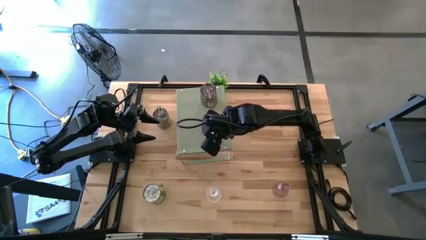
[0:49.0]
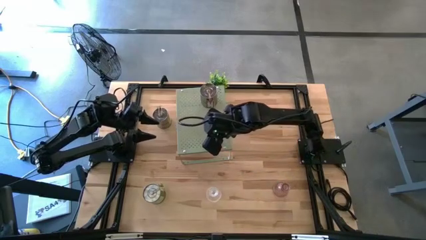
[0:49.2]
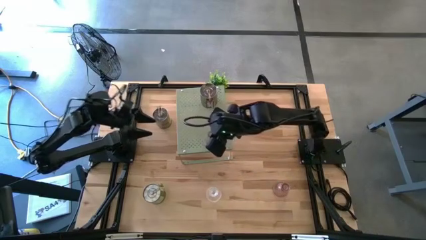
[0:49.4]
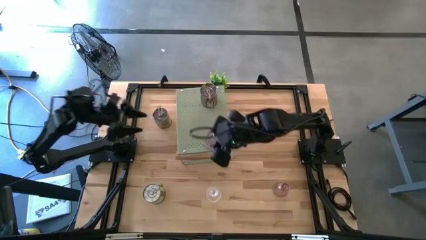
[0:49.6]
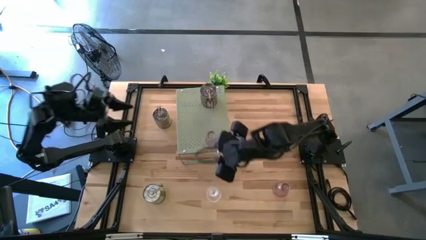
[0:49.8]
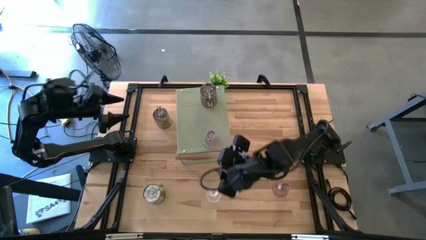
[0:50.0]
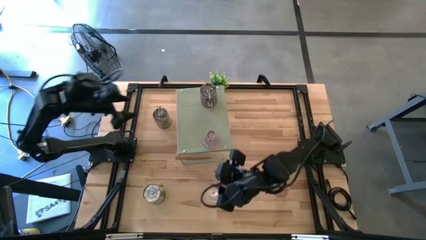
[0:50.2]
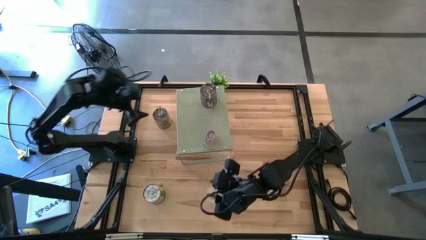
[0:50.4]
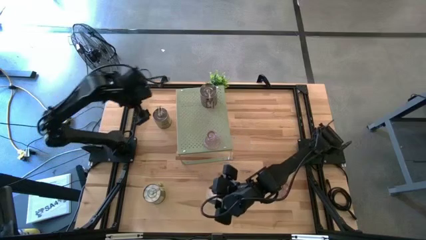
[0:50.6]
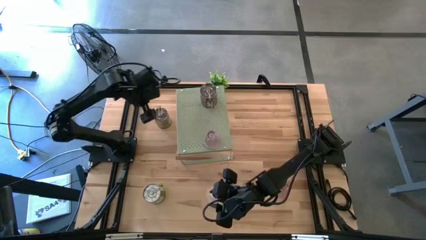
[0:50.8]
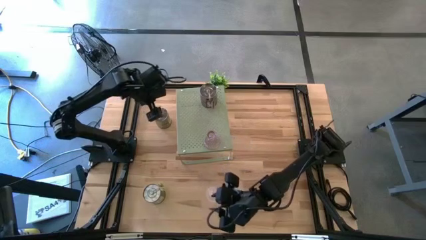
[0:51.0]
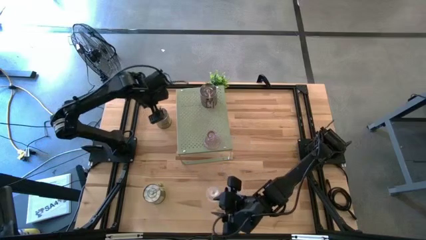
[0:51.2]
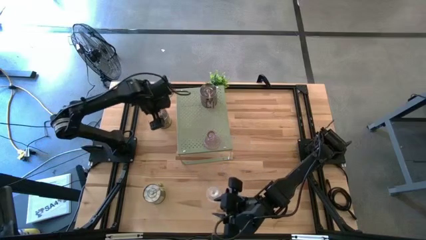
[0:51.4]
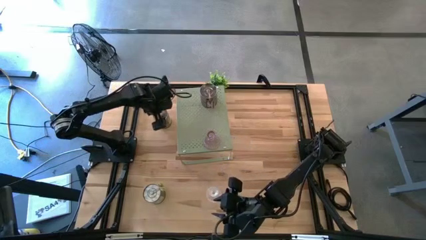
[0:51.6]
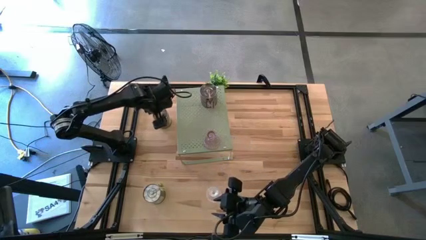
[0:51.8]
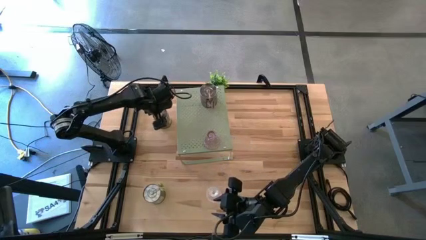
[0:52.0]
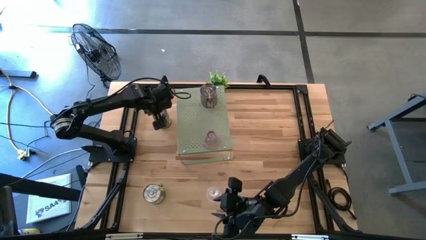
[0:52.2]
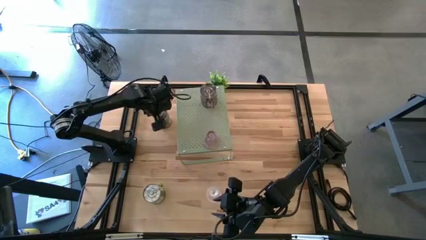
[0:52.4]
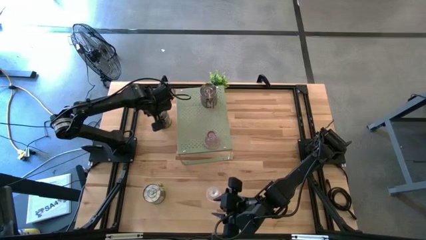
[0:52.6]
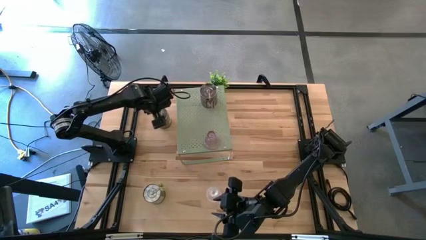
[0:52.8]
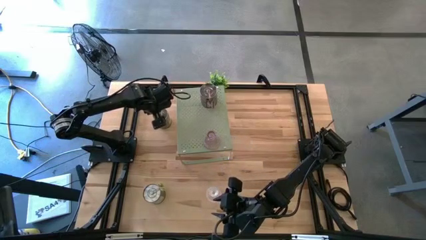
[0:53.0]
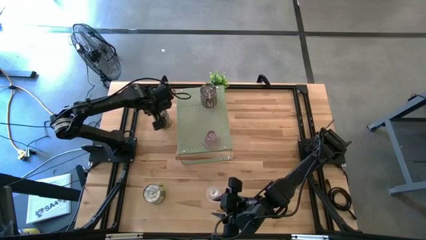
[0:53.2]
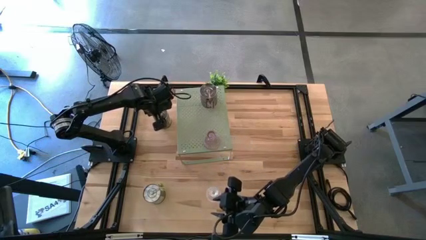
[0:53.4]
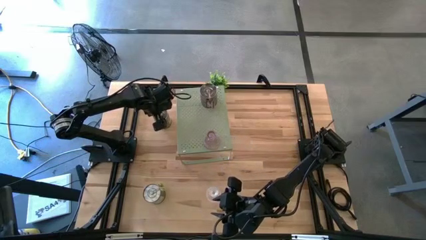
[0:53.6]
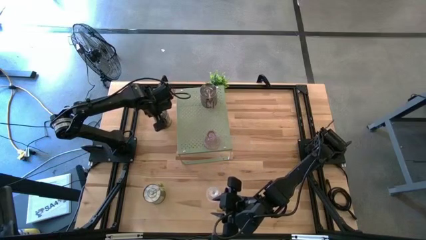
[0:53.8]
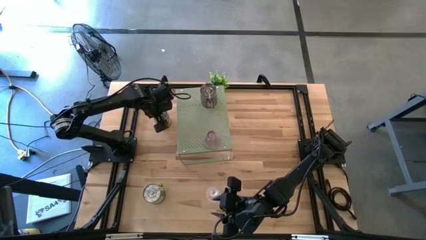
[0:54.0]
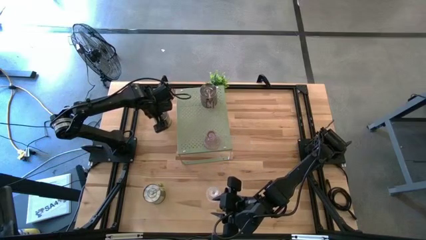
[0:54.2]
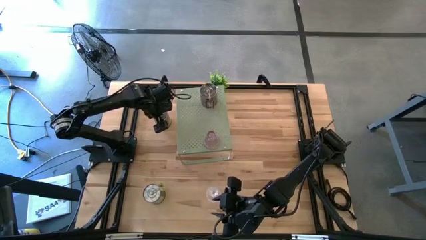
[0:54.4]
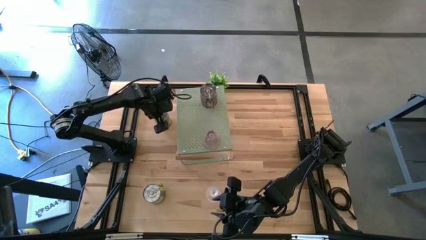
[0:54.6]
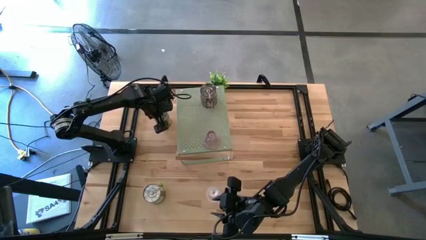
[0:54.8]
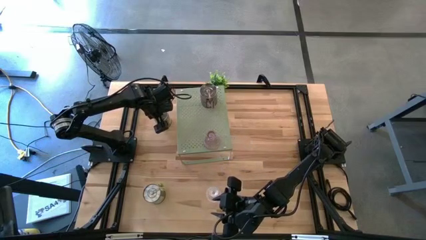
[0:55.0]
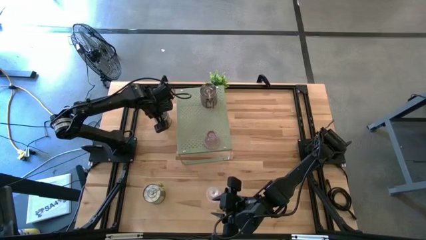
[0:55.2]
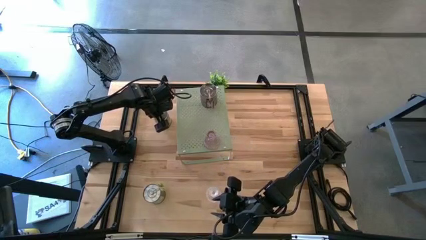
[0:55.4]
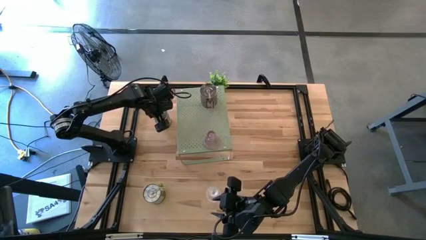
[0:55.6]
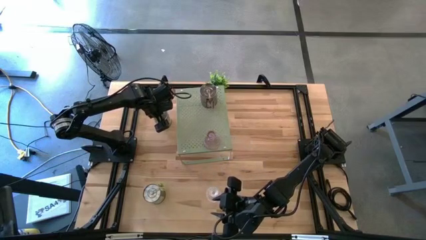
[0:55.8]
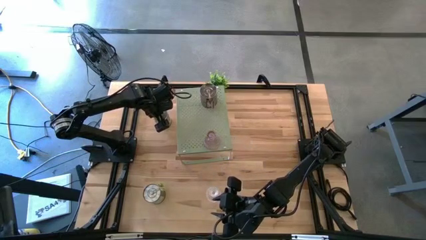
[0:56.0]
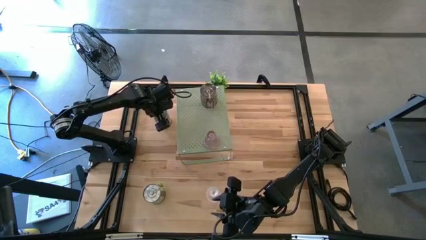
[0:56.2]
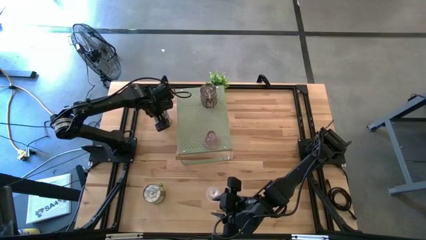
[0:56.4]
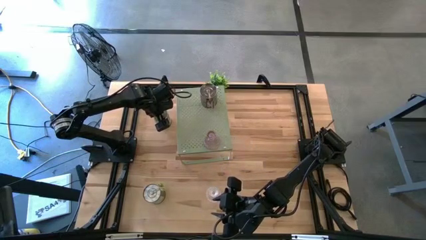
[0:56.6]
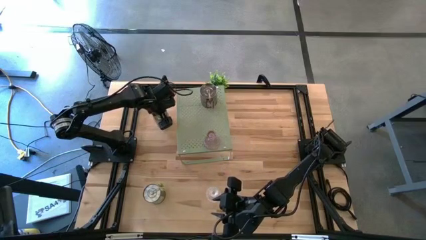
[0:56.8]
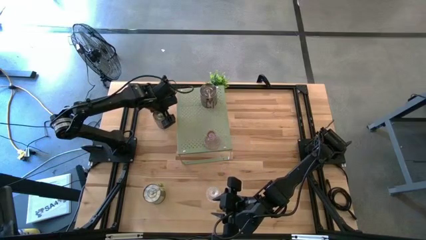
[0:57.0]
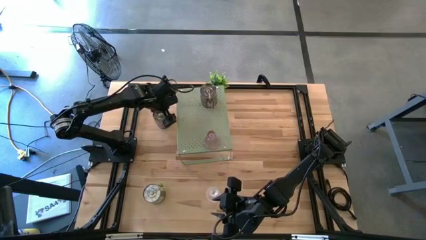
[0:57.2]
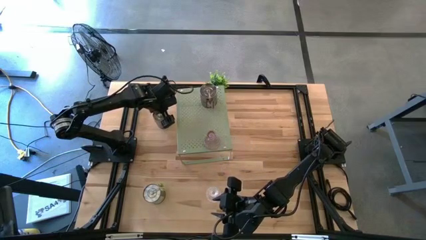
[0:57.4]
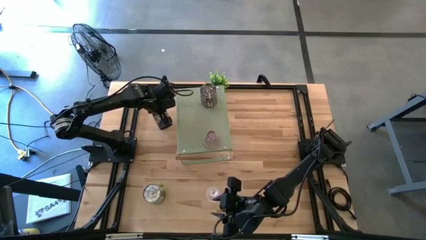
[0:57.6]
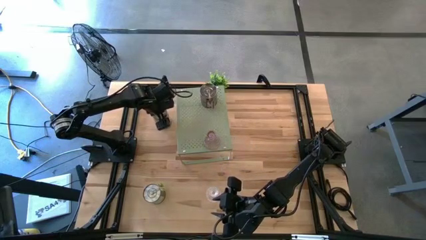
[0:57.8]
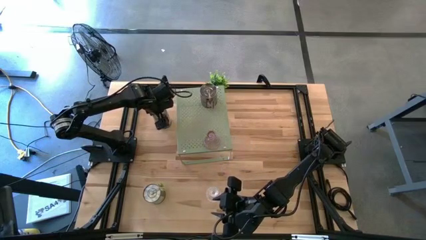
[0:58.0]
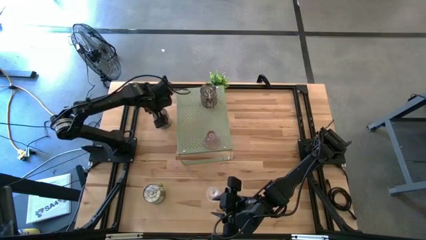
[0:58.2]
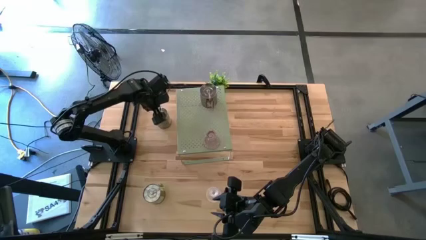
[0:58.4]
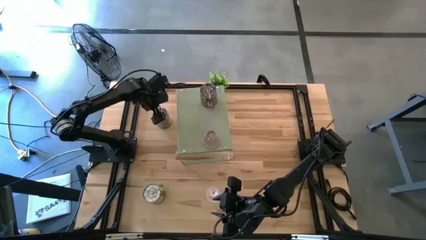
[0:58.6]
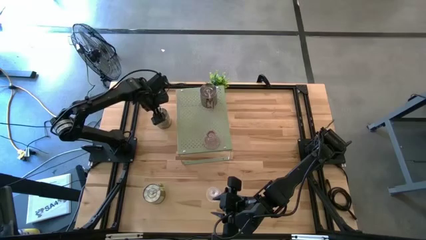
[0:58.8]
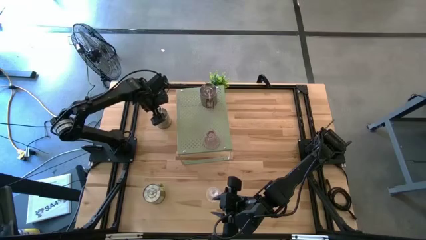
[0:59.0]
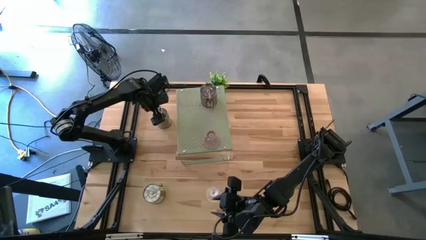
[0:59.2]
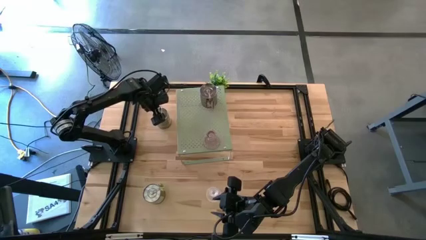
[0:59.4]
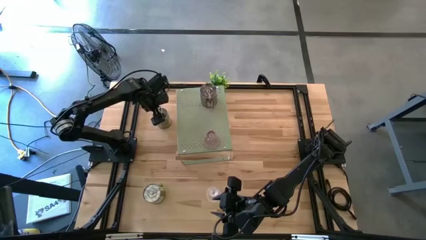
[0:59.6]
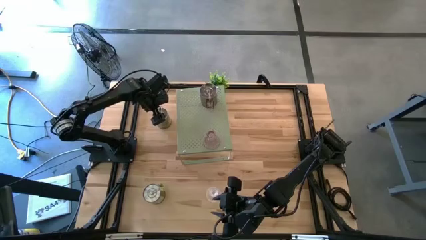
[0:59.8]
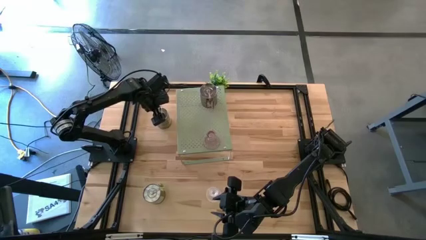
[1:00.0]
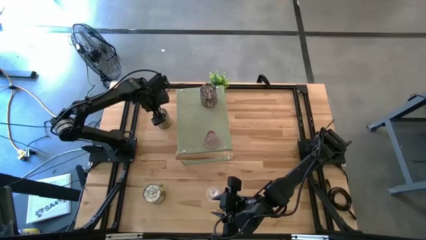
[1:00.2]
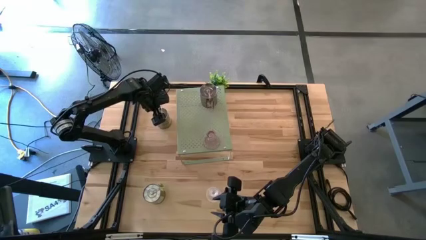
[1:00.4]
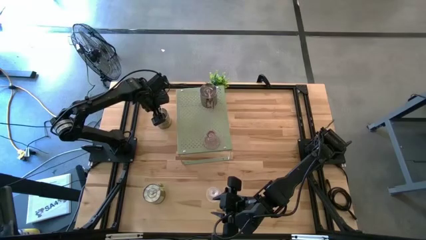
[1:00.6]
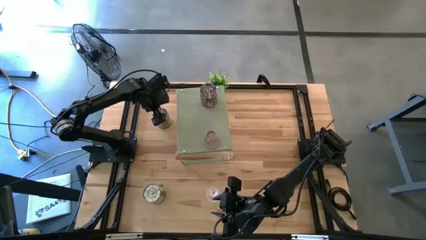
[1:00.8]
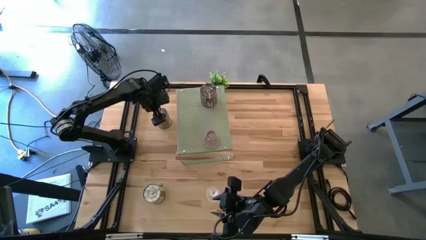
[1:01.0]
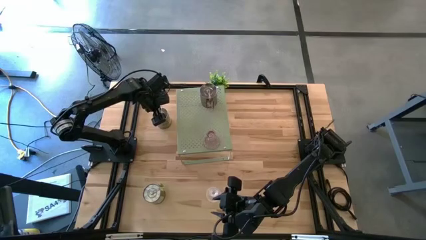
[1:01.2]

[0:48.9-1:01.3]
Task: Pick & Place candle stick holders
Put the top brown scented candle on the shelf

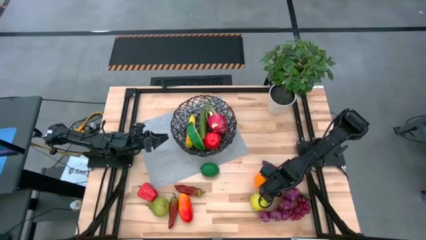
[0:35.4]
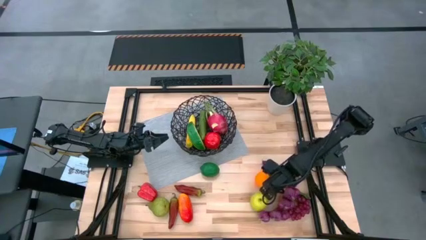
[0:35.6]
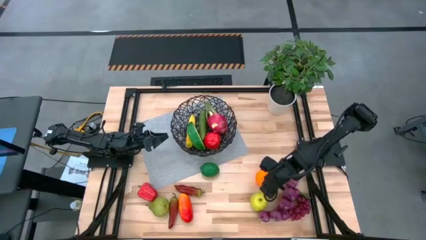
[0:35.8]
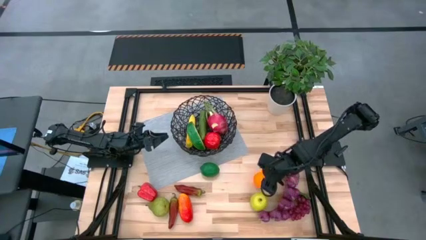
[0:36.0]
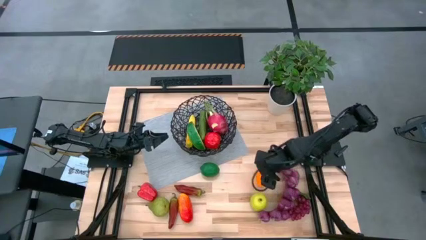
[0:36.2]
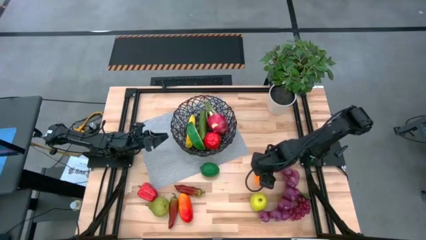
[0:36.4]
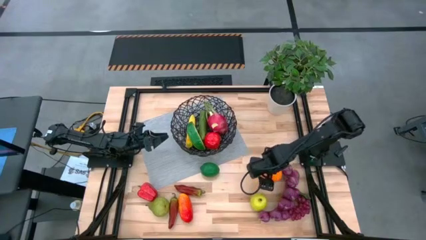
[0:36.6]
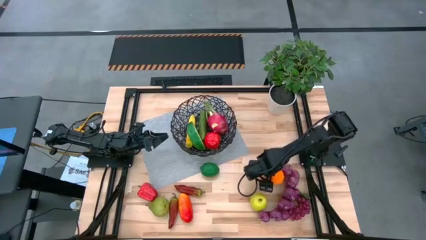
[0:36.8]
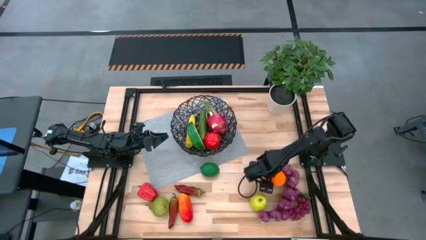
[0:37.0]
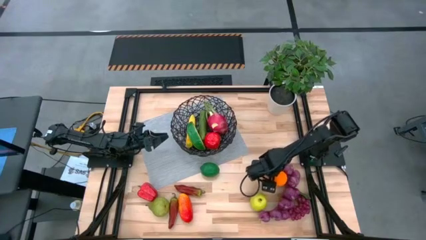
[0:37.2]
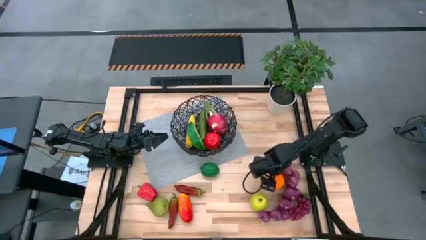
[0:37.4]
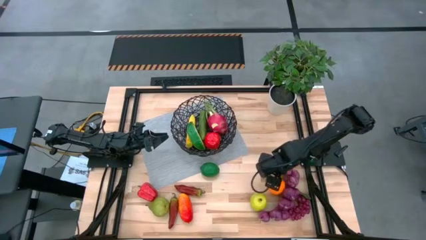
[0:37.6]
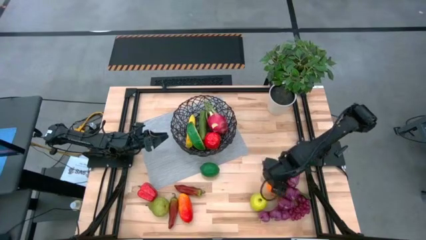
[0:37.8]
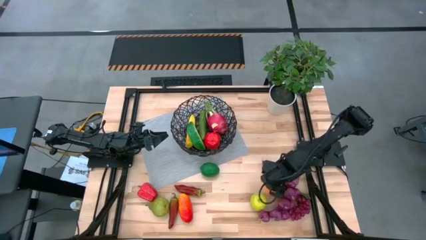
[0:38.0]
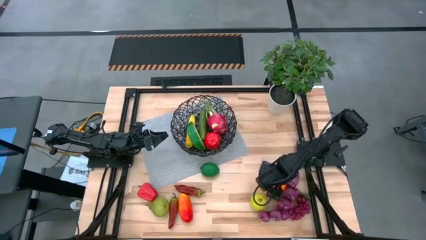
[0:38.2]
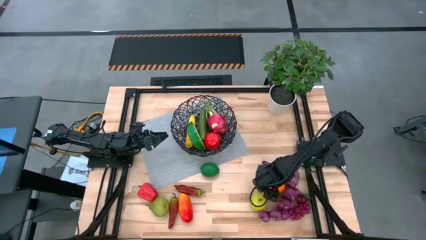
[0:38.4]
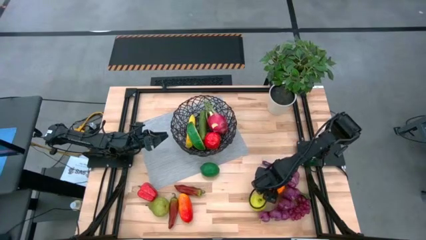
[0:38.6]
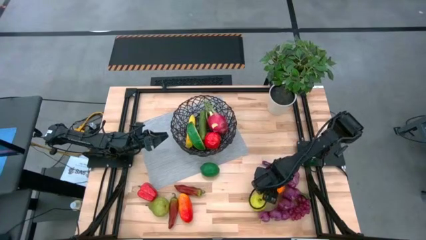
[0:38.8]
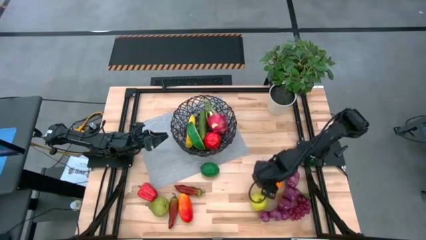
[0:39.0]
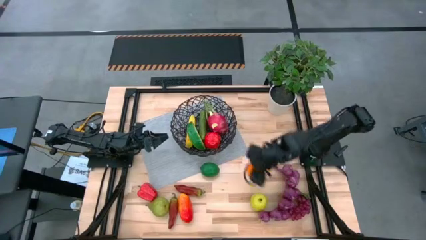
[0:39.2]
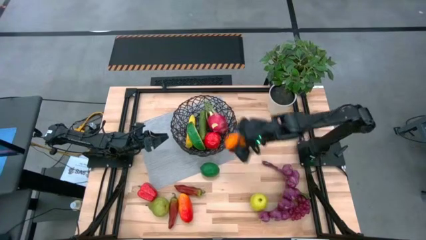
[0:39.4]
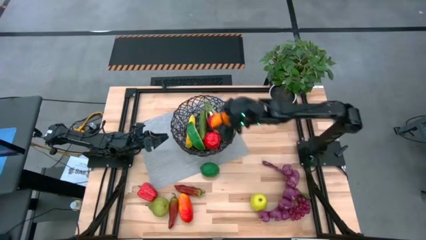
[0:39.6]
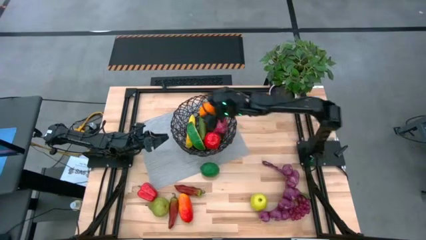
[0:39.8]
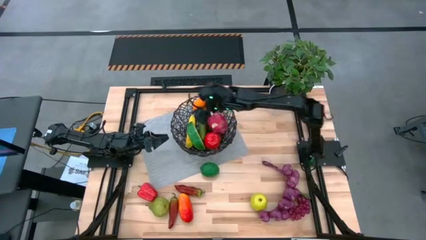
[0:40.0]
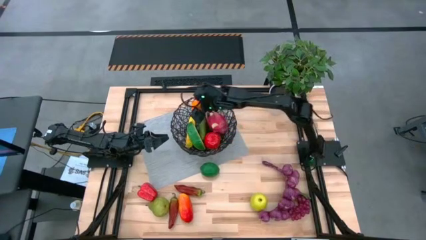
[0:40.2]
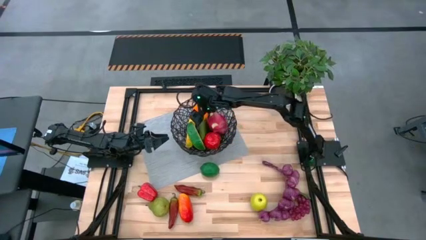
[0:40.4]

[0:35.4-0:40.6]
Task: Build produce basket
Put the orange into the wired basket
